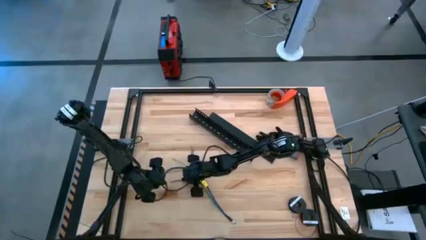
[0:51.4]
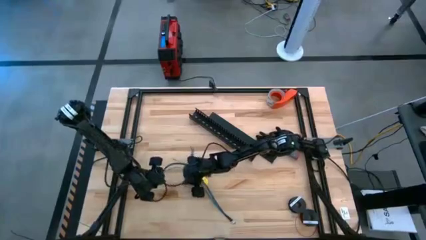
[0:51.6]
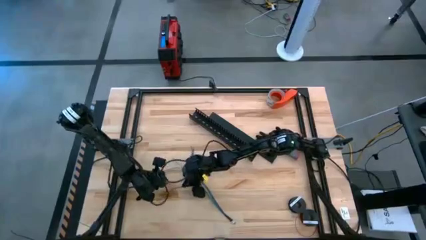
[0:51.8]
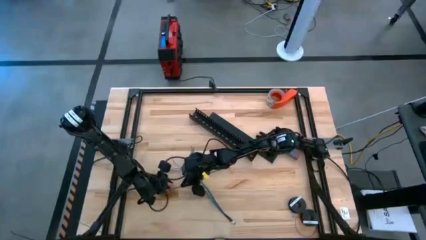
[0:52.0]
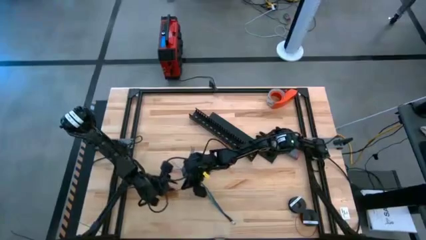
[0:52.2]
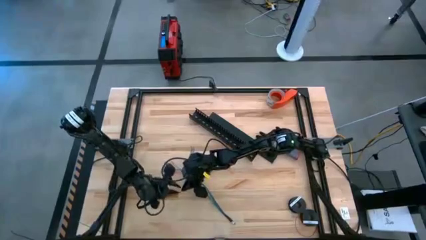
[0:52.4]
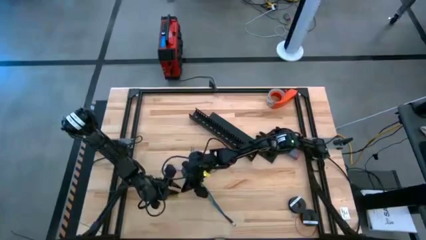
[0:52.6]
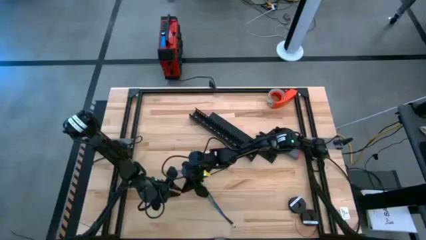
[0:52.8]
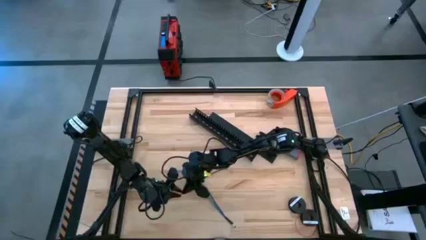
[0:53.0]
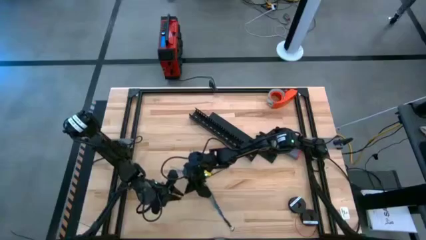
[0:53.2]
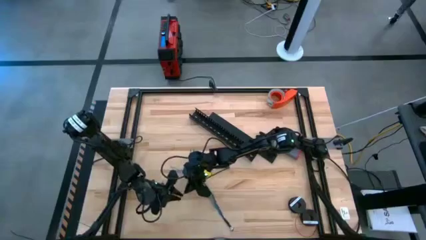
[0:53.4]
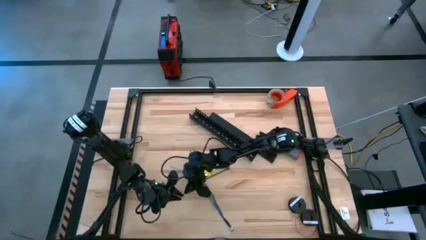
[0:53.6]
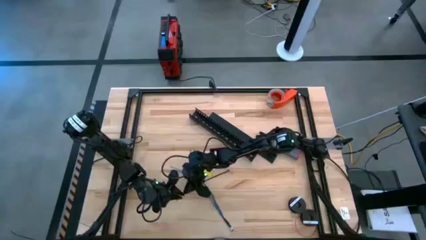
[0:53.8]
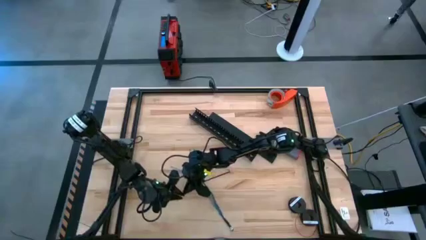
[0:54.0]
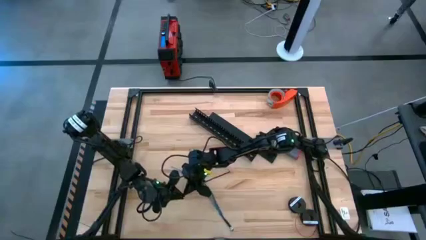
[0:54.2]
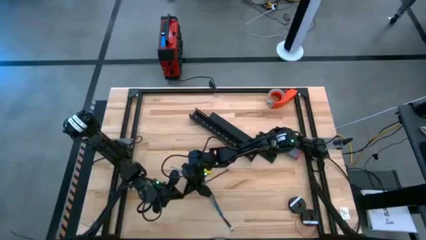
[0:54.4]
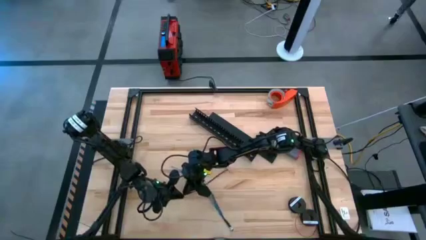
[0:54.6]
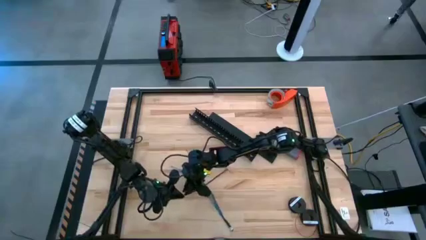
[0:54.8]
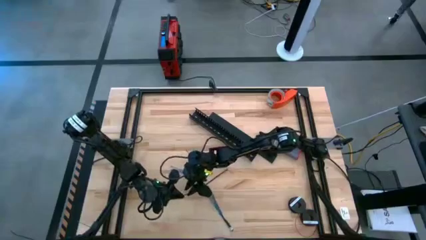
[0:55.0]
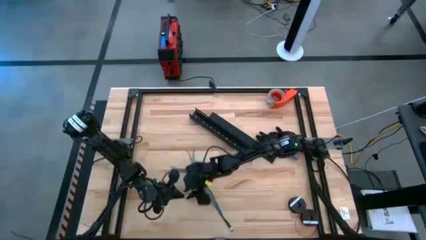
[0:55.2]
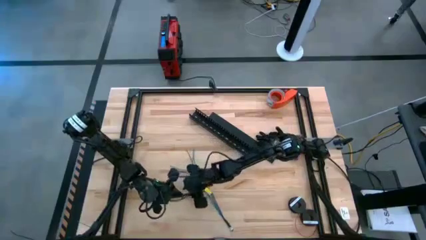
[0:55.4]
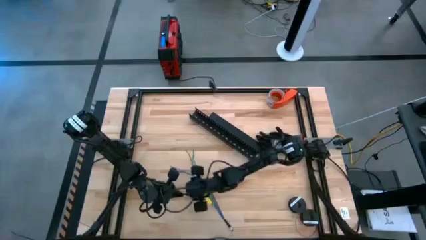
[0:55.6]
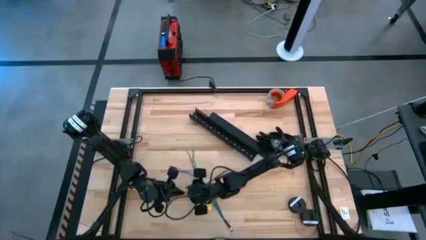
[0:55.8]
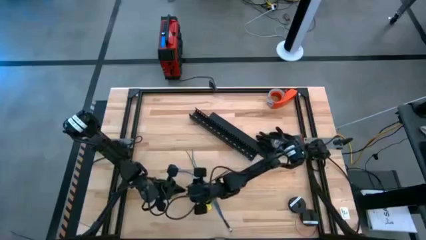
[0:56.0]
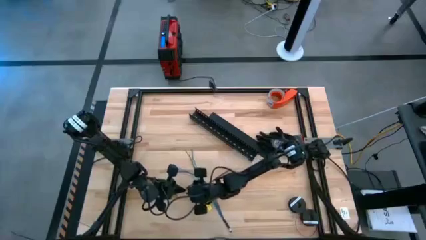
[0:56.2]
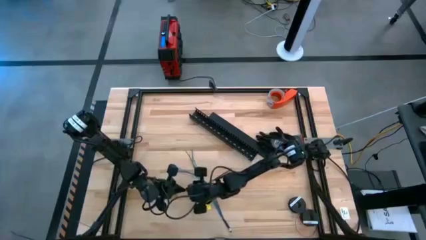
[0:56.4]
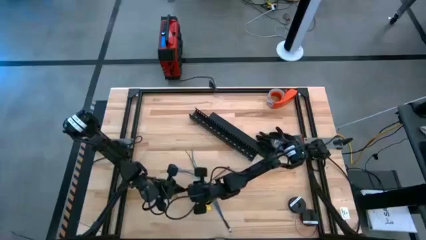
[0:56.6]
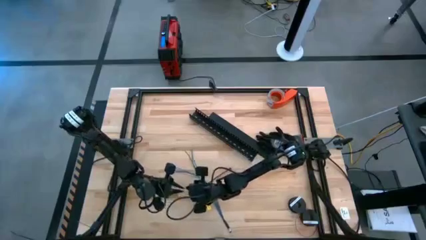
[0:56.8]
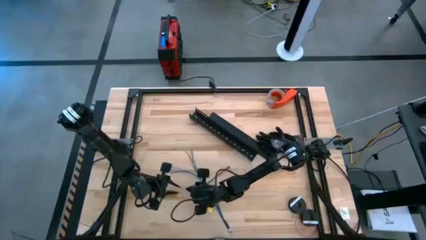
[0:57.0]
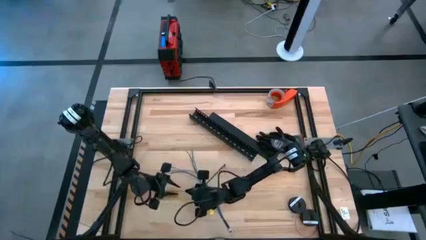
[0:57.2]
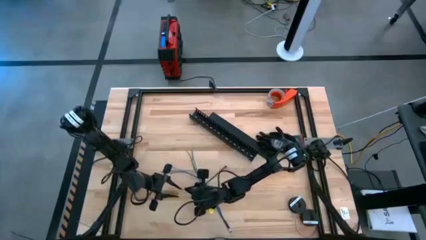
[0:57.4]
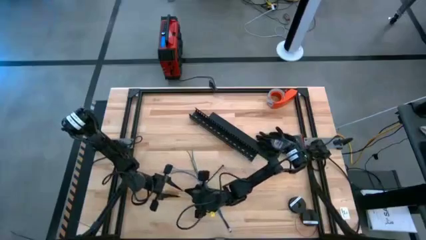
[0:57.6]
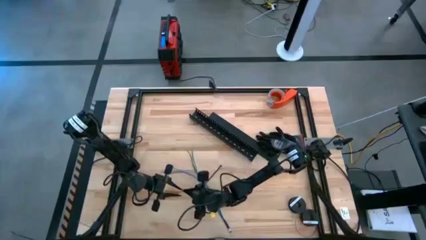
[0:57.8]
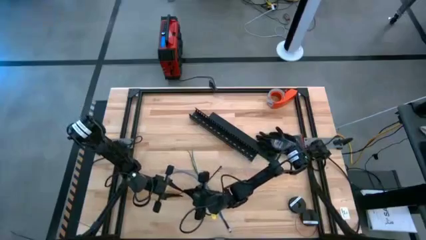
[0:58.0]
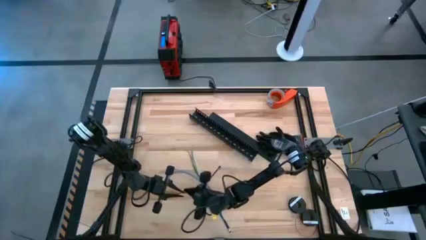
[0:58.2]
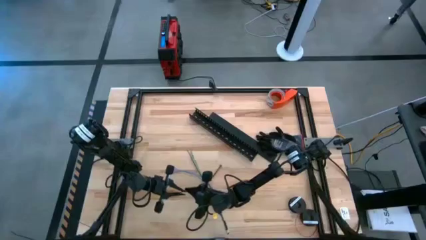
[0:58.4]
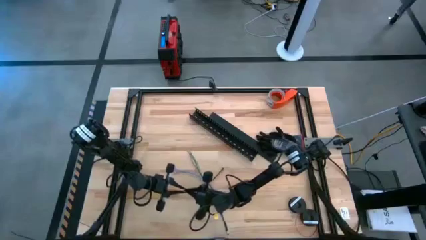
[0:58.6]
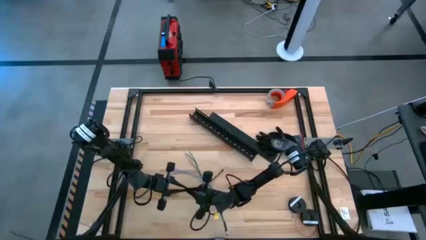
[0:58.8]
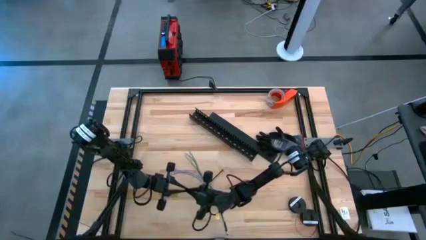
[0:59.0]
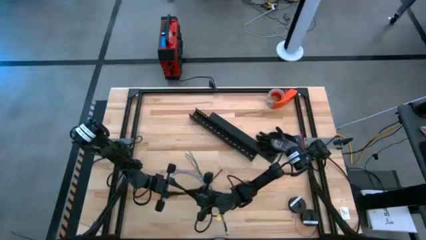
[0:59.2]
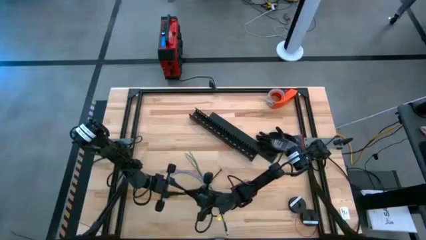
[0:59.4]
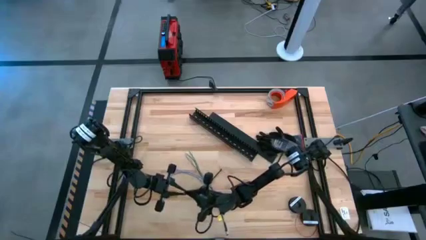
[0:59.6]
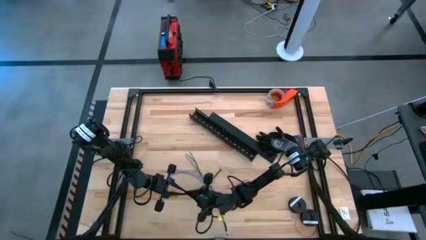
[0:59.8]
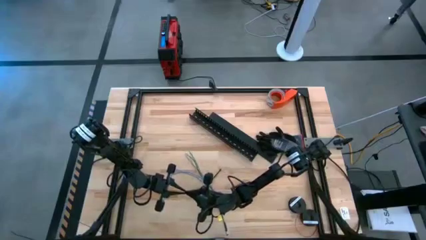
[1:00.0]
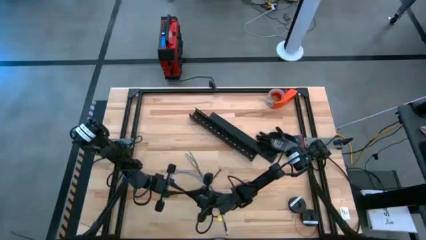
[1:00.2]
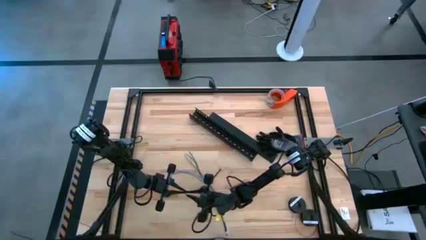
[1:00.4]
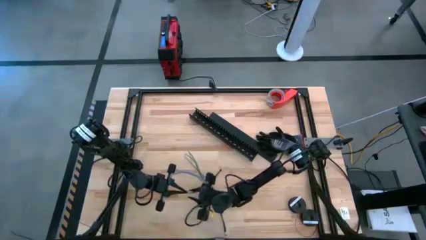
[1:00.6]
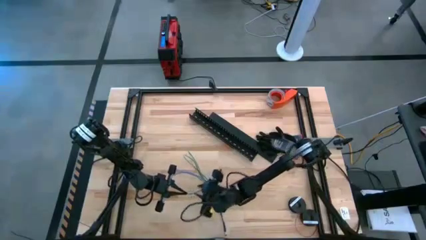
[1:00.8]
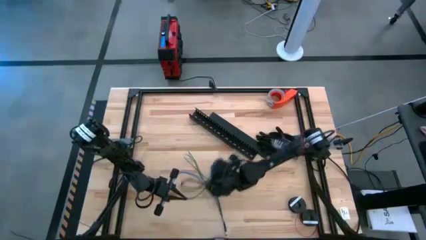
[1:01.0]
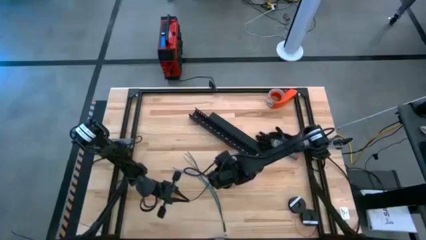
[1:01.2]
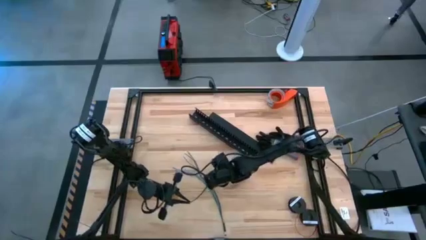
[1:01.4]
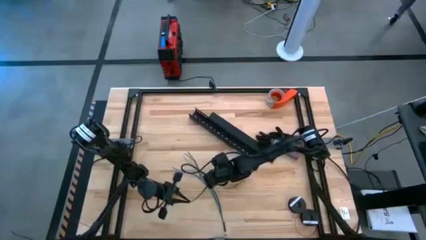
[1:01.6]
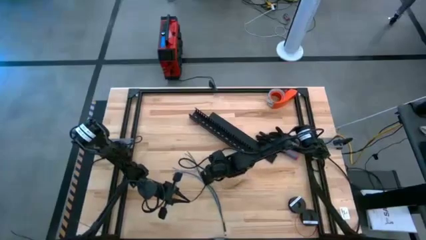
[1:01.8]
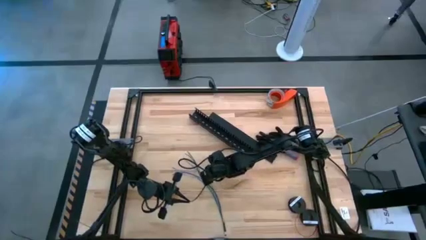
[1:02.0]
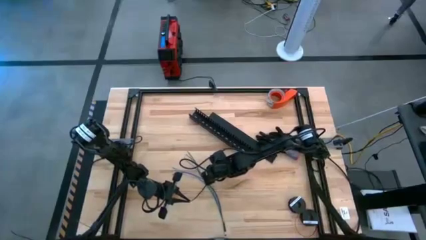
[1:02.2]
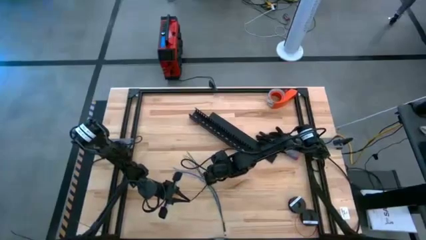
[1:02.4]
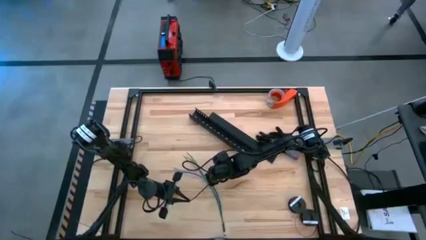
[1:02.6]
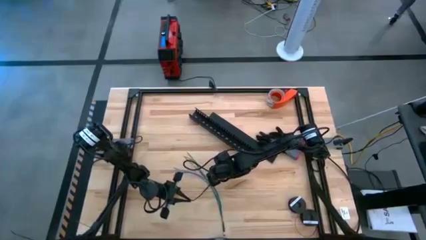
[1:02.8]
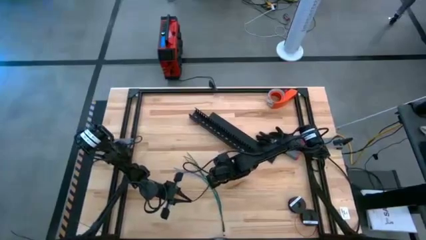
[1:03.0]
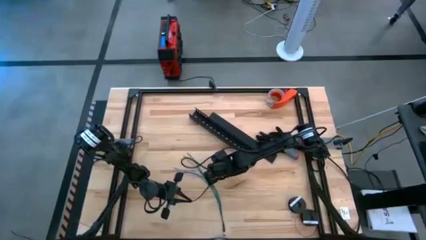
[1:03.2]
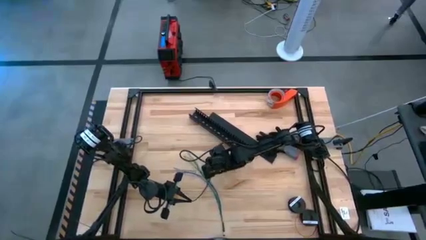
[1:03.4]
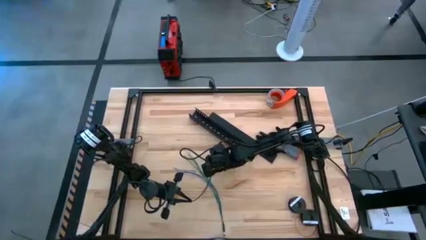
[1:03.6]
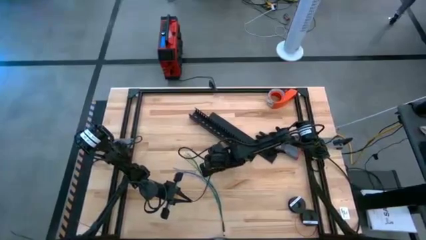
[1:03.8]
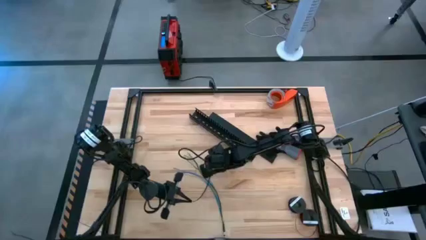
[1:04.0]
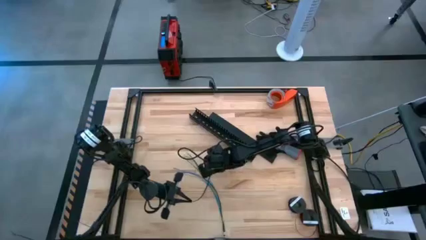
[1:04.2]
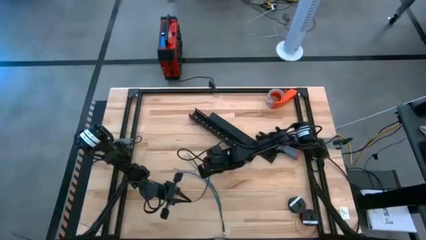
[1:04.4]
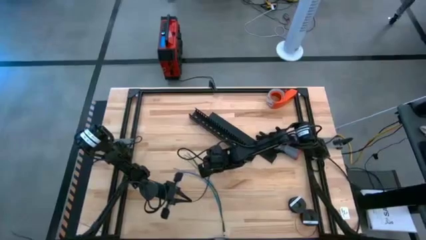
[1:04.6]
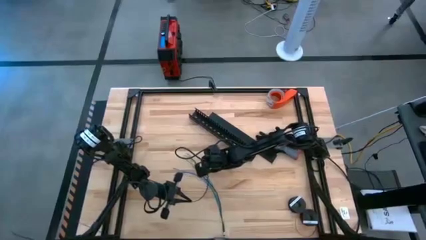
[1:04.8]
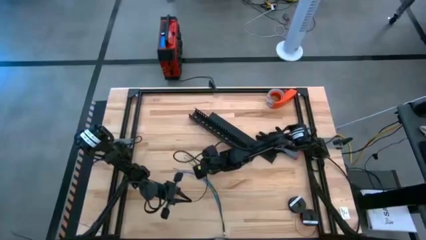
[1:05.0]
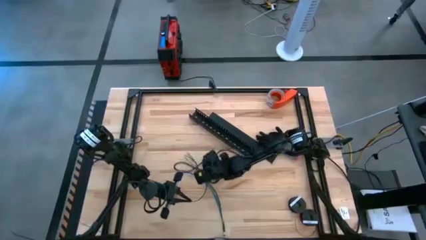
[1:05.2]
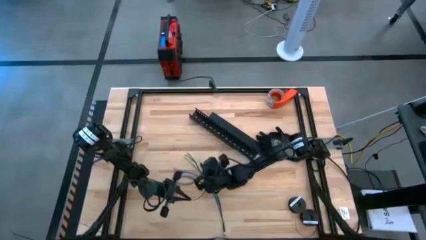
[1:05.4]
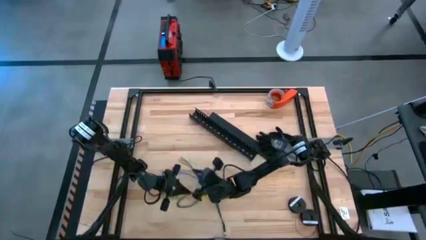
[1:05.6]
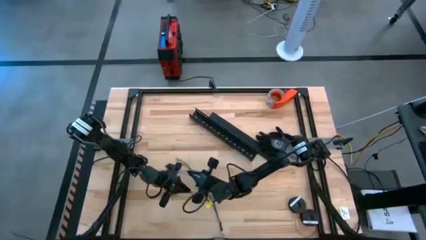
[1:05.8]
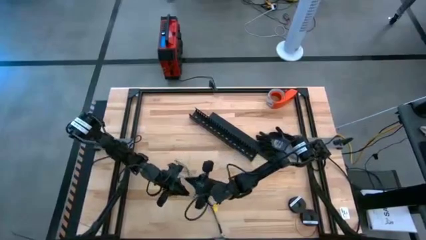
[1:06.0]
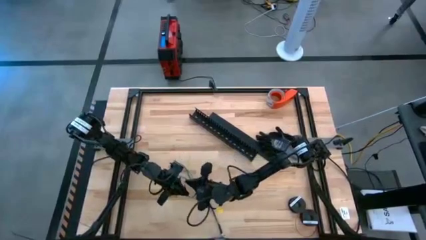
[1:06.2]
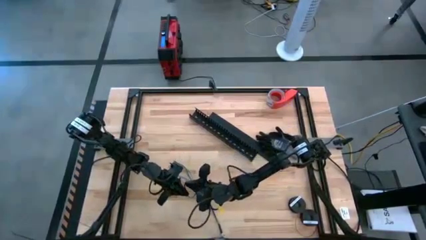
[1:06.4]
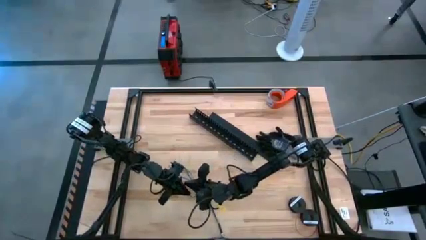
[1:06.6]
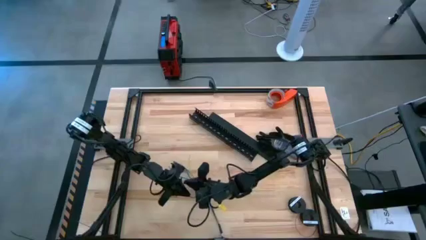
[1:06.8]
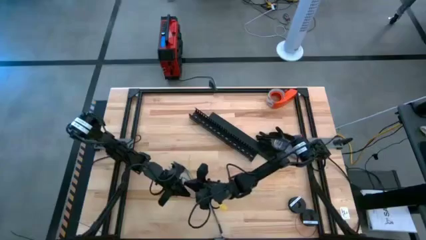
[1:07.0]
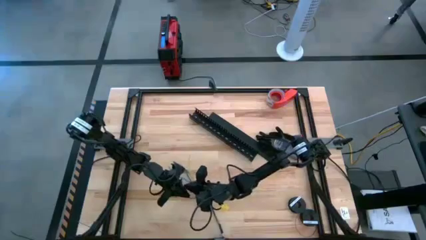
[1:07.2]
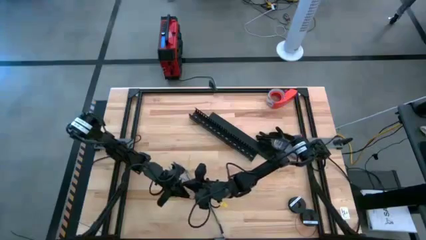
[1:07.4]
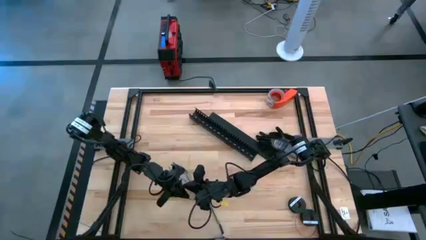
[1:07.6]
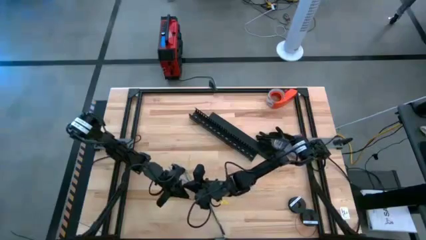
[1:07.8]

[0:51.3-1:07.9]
Task: Ziptie cables
Wrap the zip tie around the cable bundle
